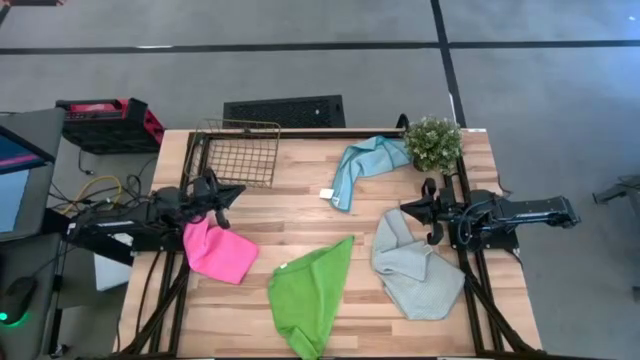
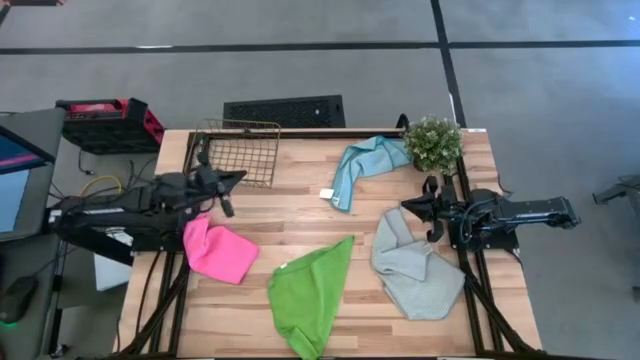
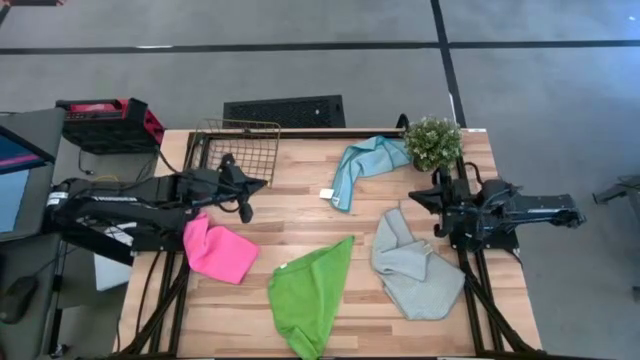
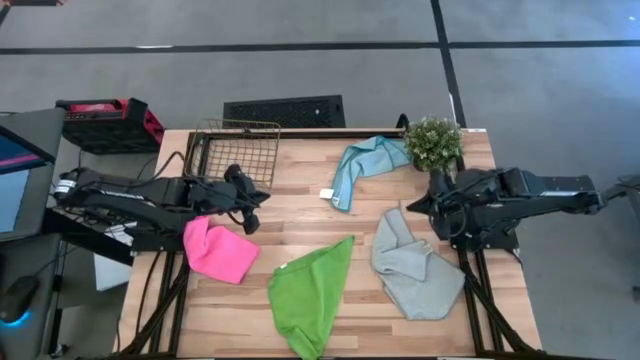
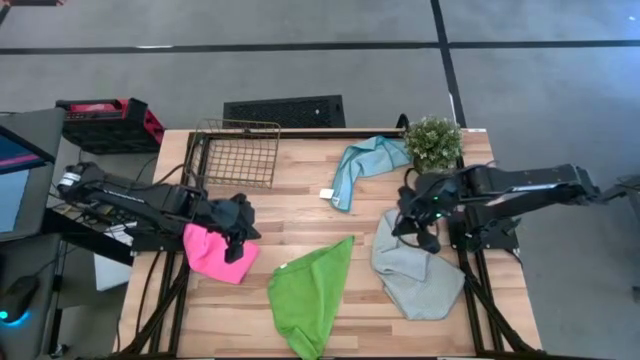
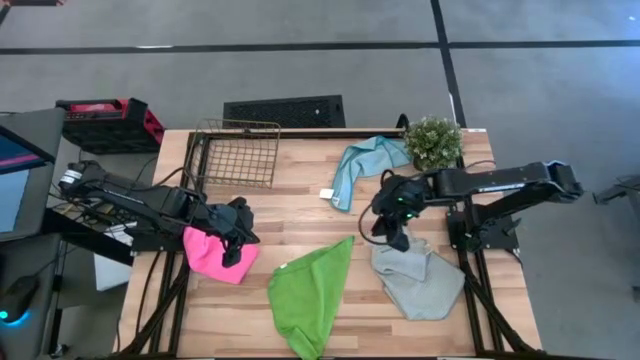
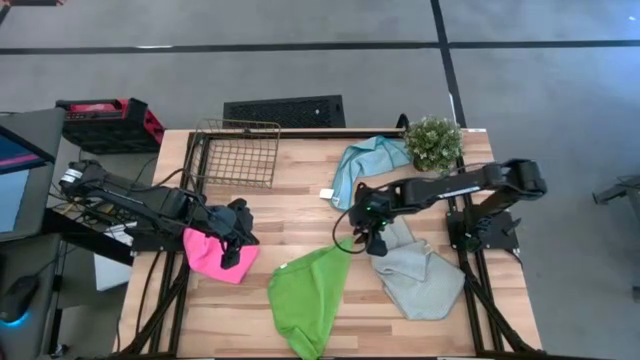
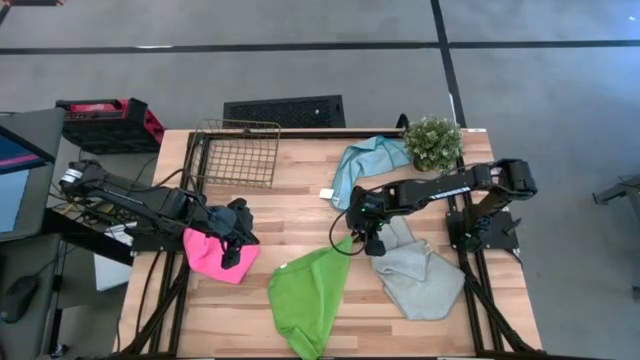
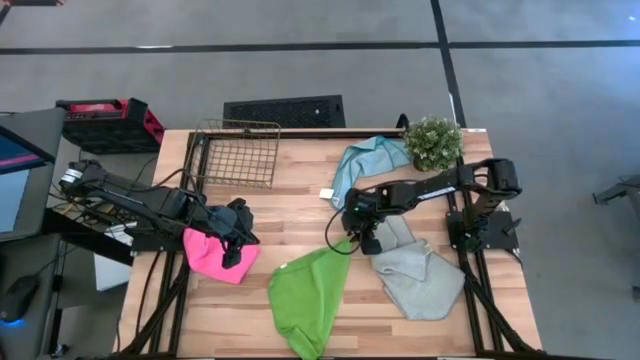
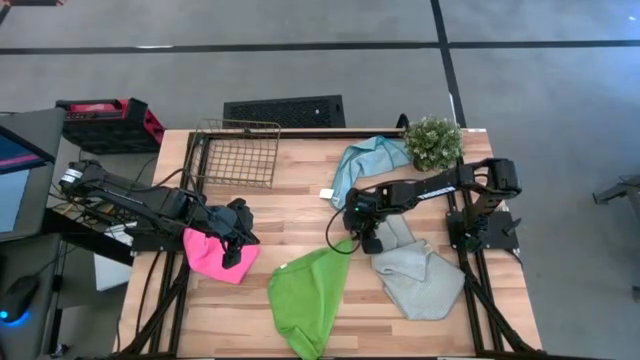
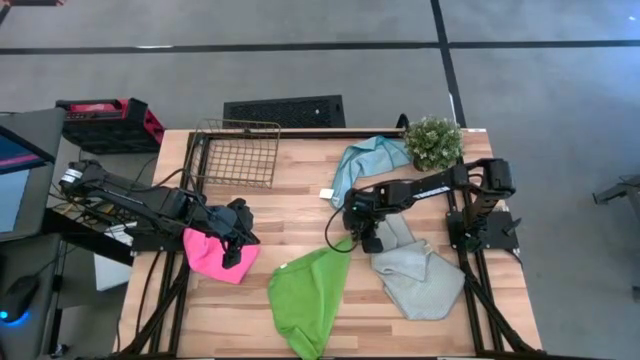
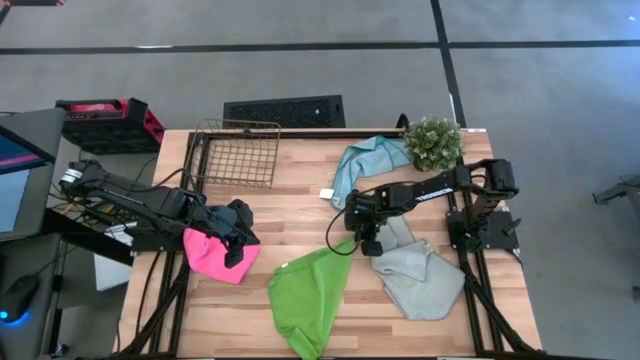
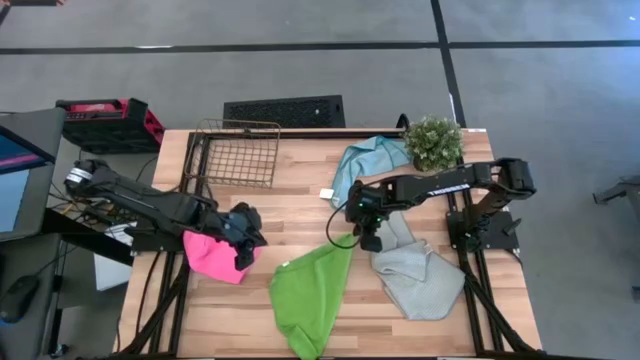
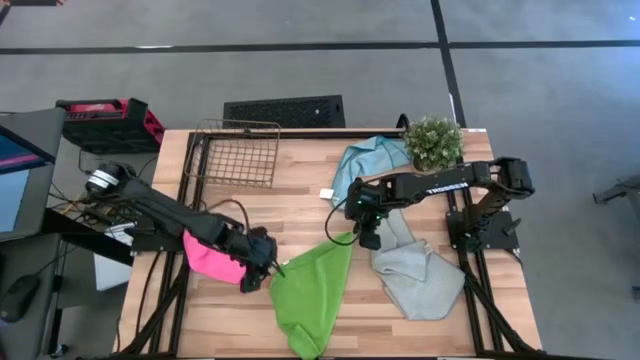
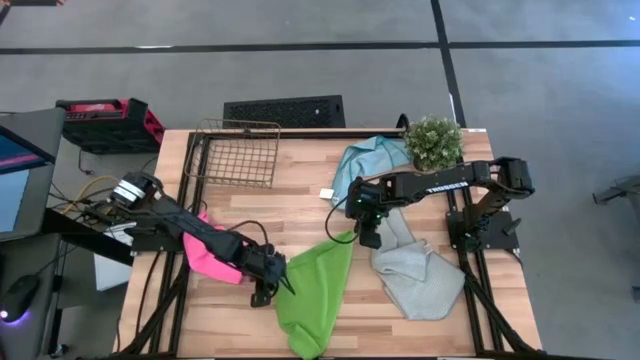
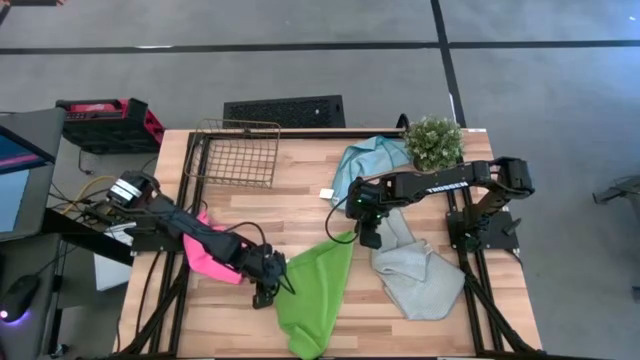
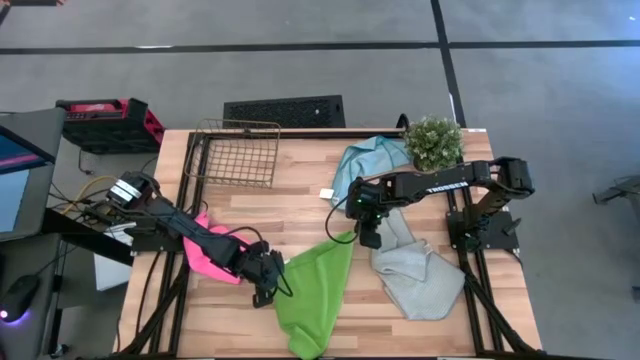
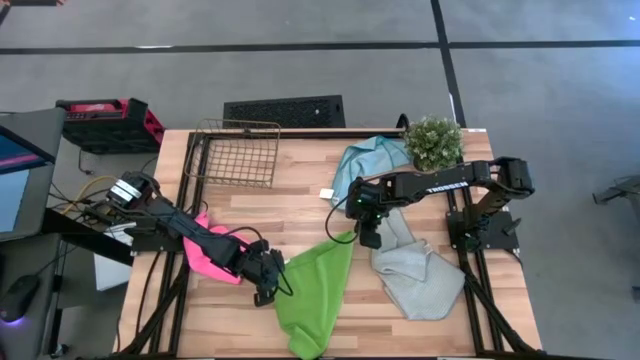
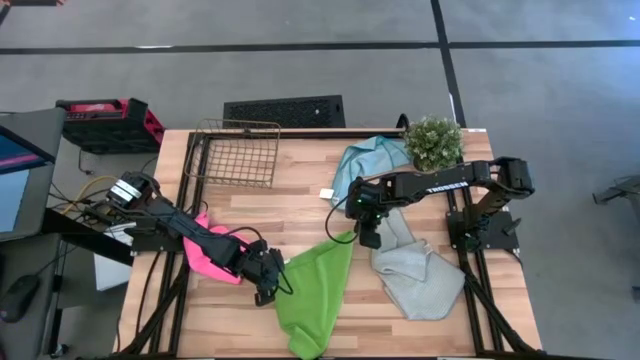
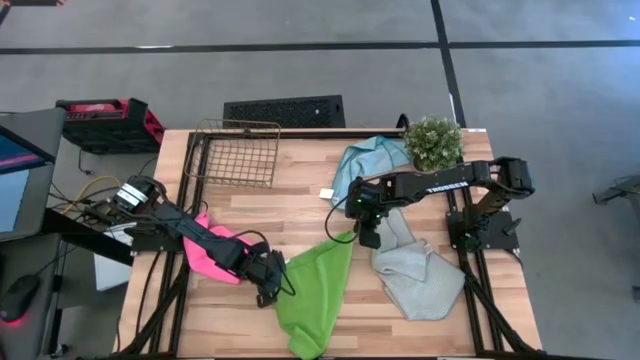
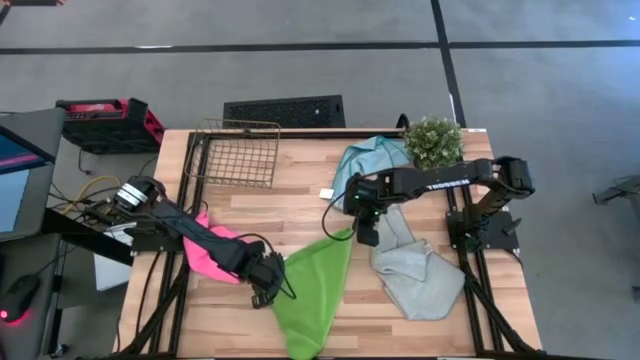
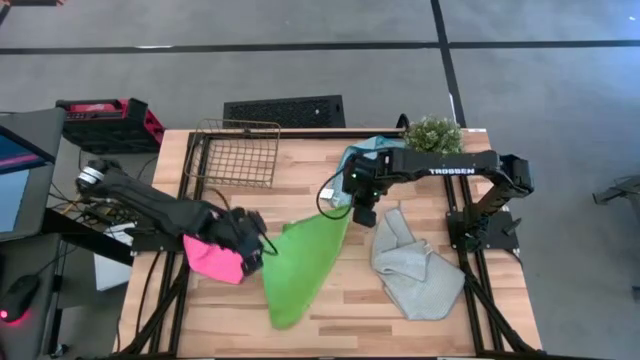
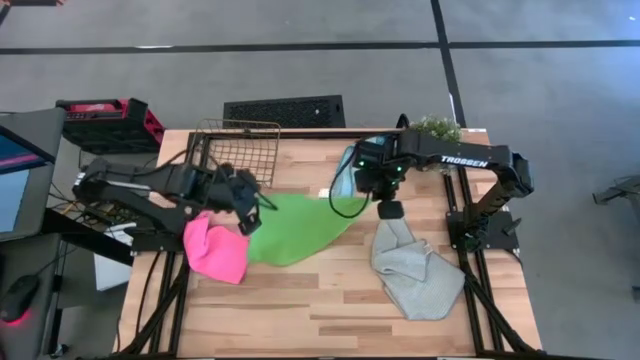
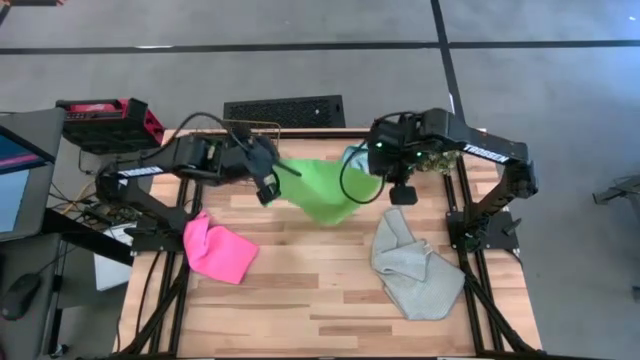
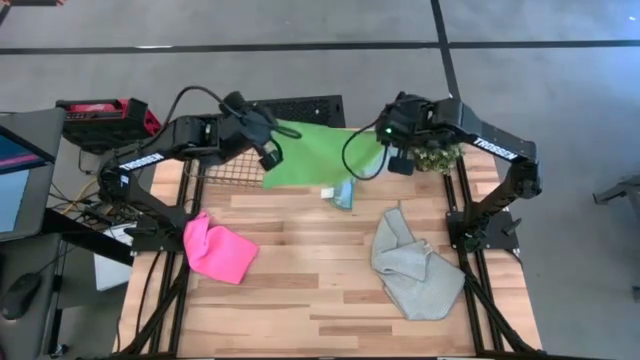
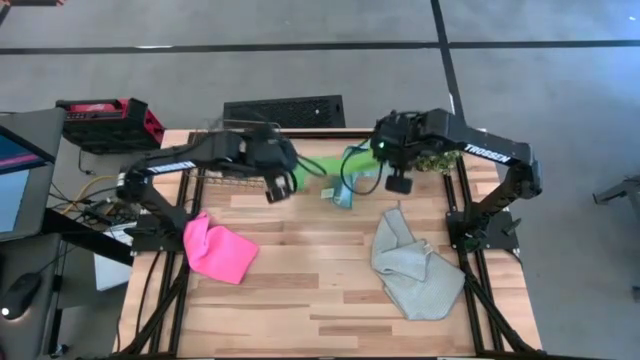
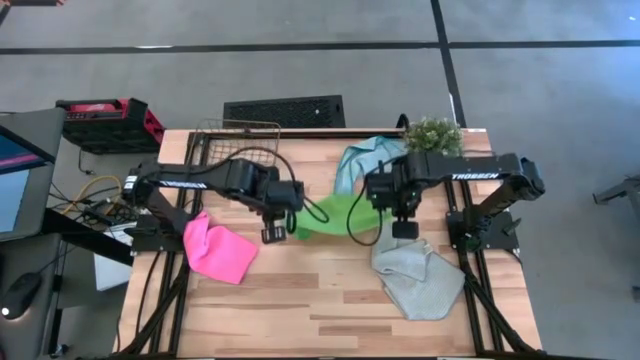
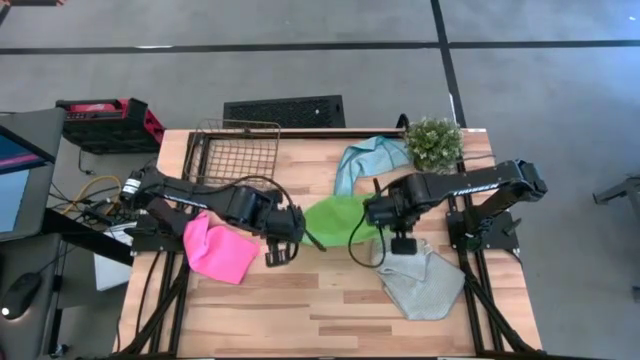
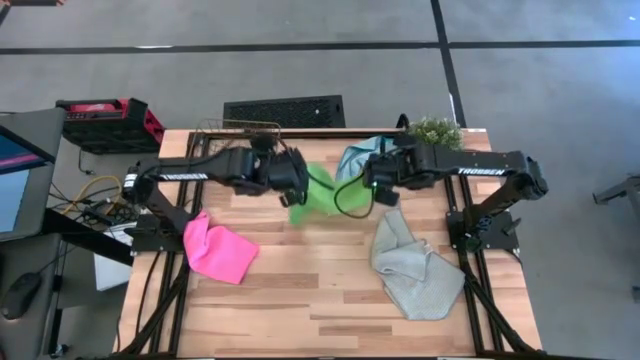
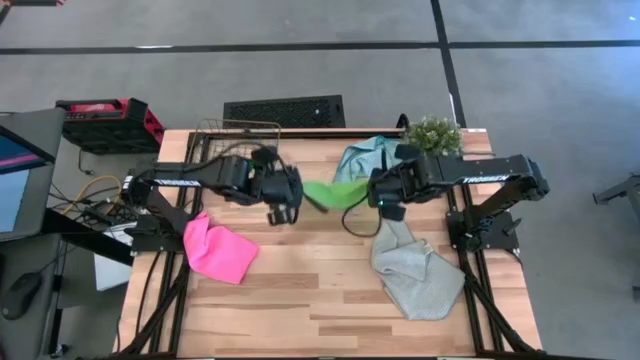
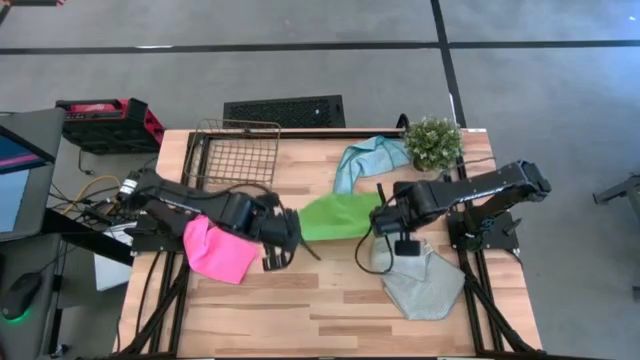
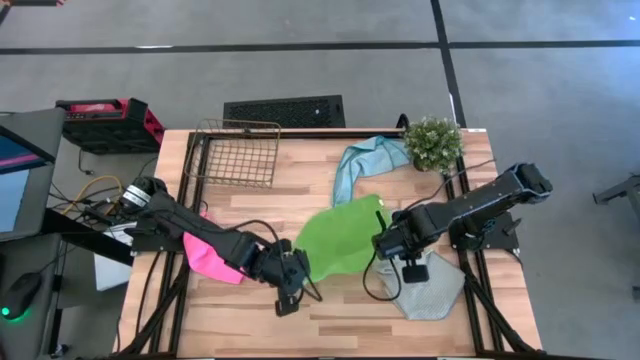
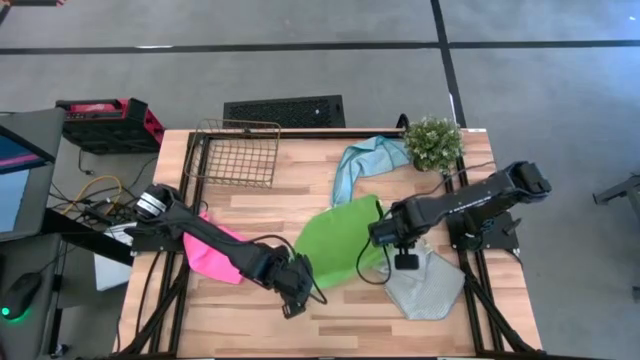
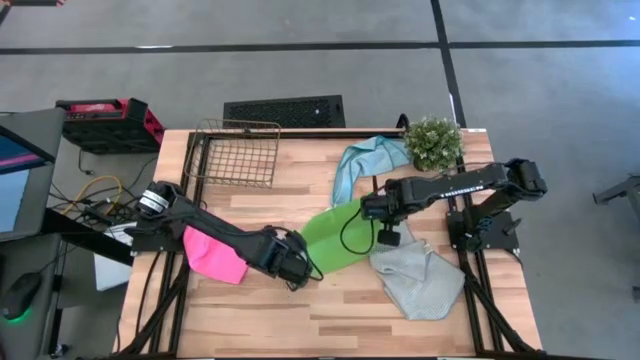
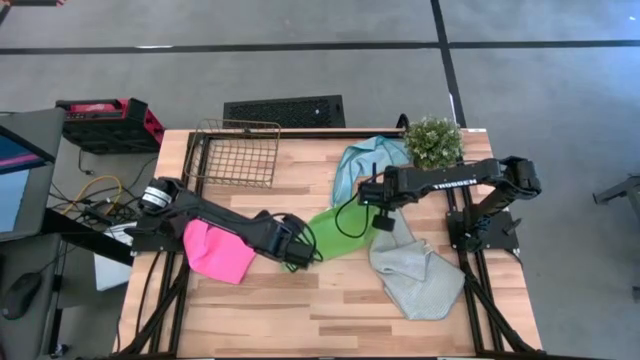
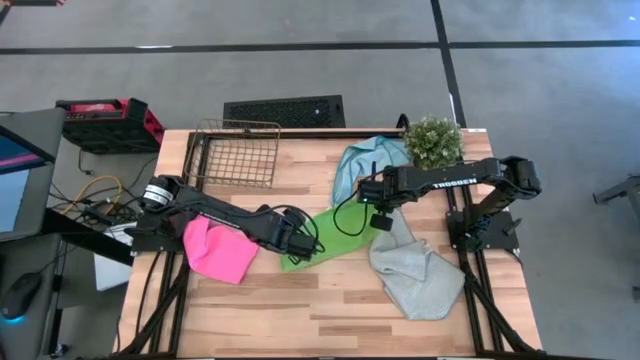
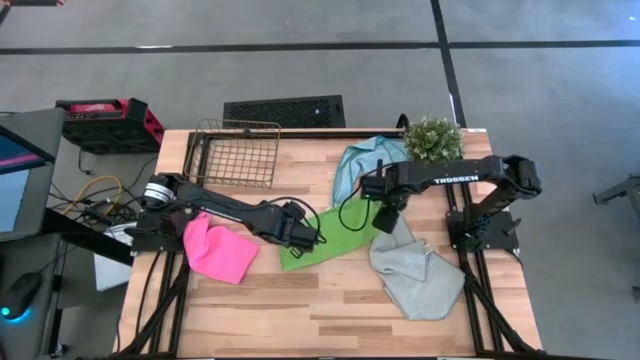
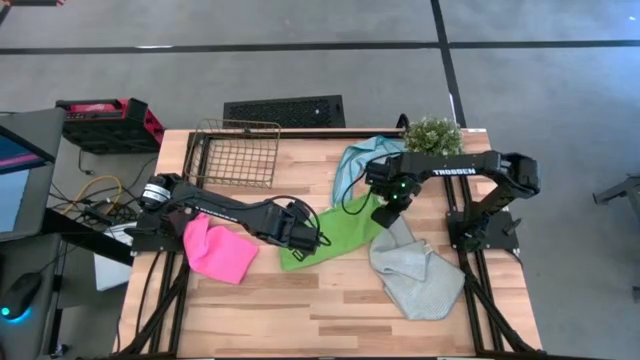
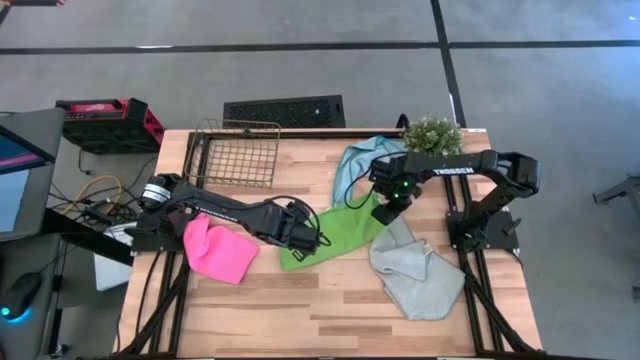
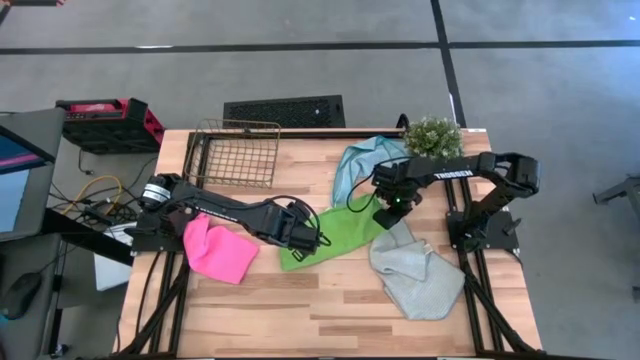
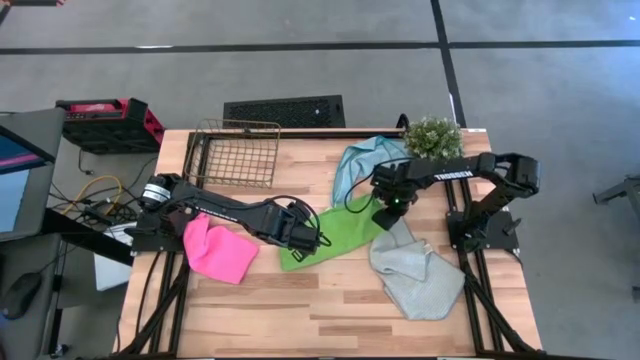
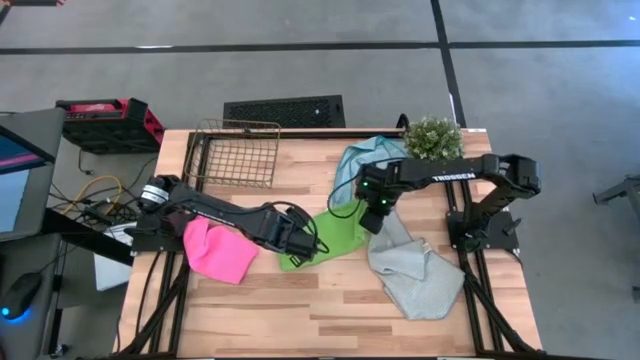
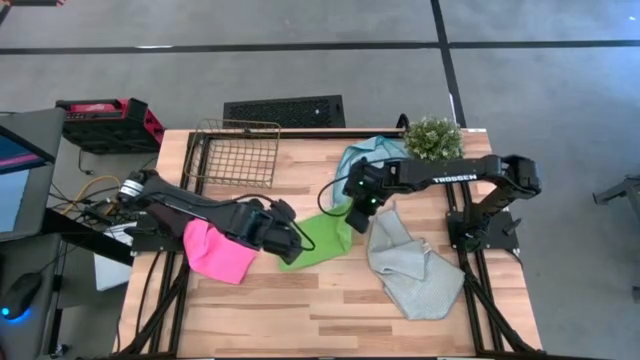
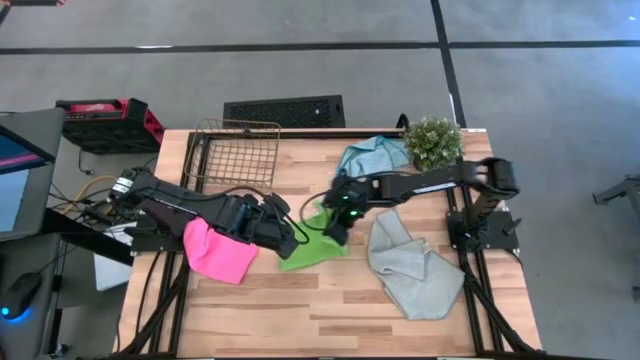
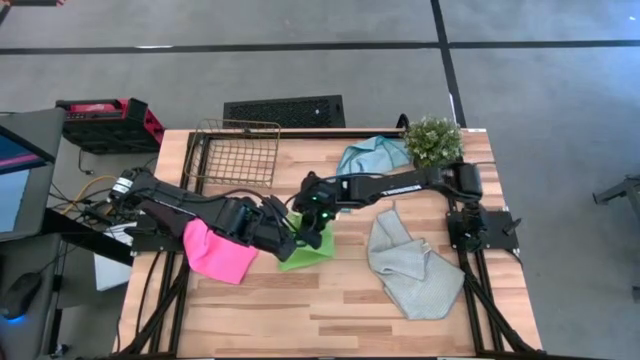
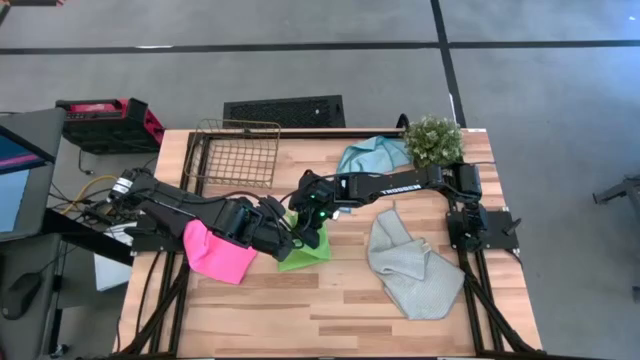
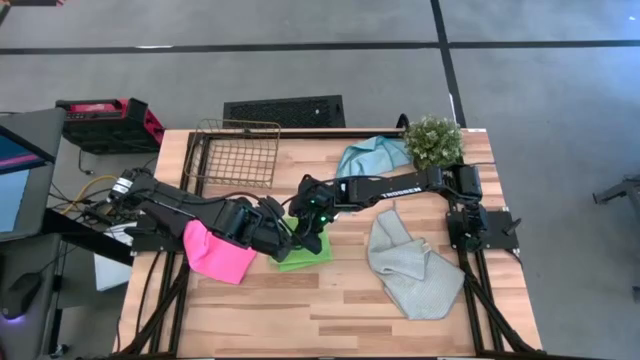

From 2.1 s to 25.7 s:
Task: Fold microfiber towels
Fold the green microfiber cloth
